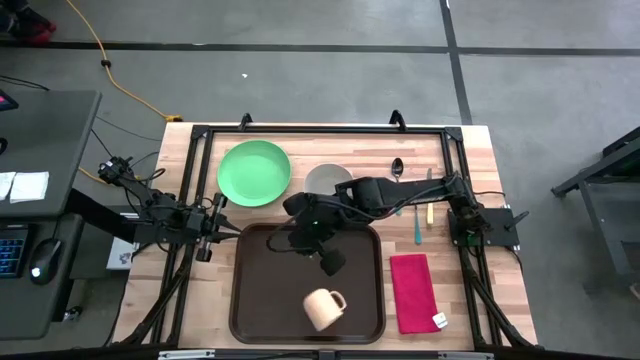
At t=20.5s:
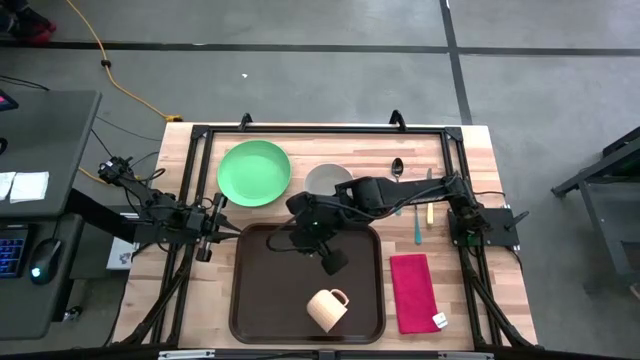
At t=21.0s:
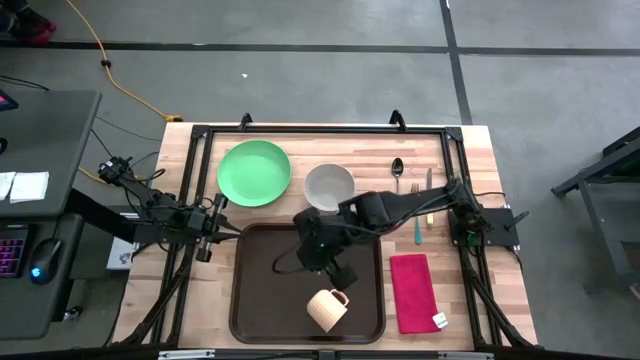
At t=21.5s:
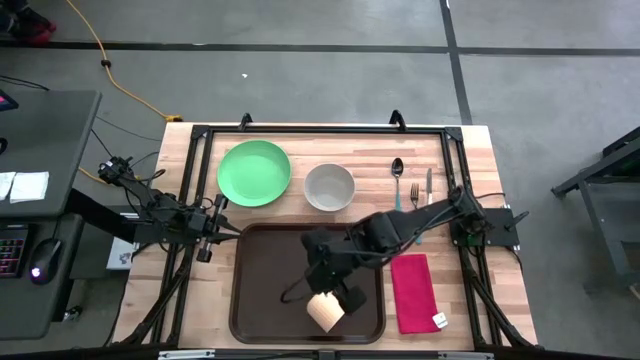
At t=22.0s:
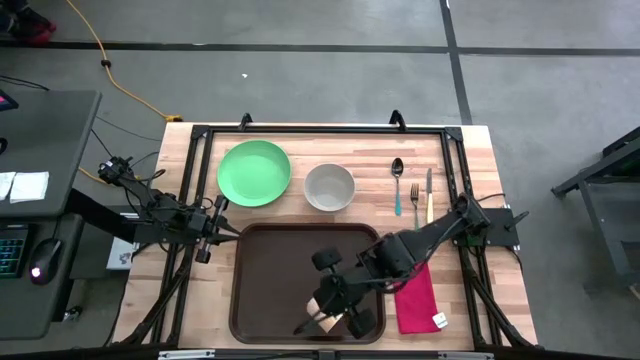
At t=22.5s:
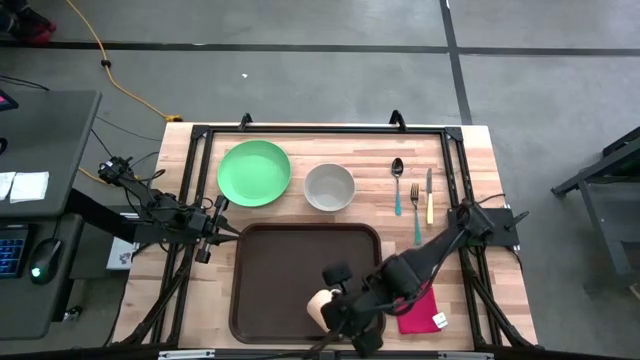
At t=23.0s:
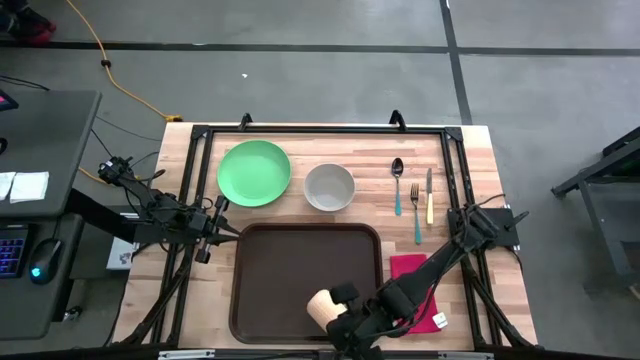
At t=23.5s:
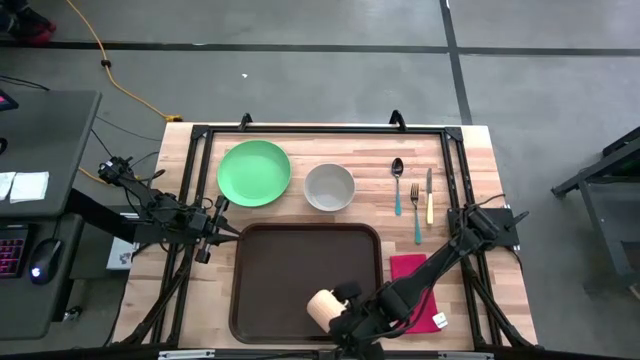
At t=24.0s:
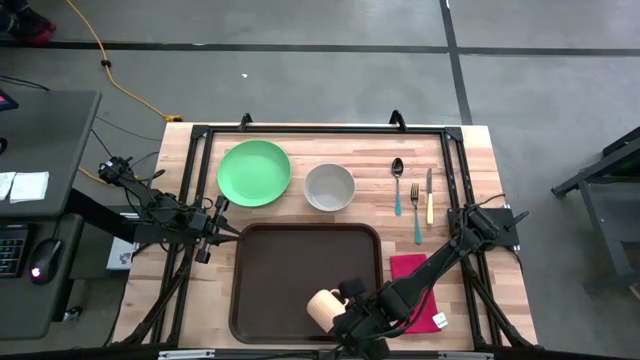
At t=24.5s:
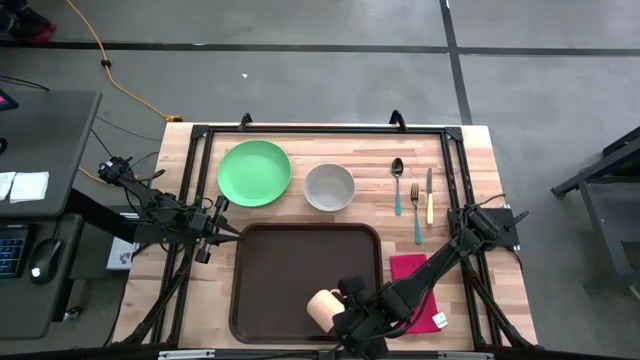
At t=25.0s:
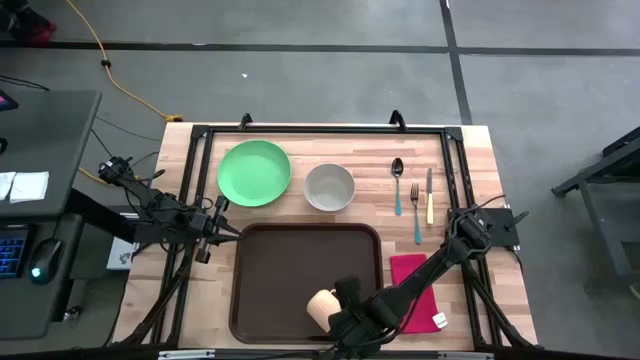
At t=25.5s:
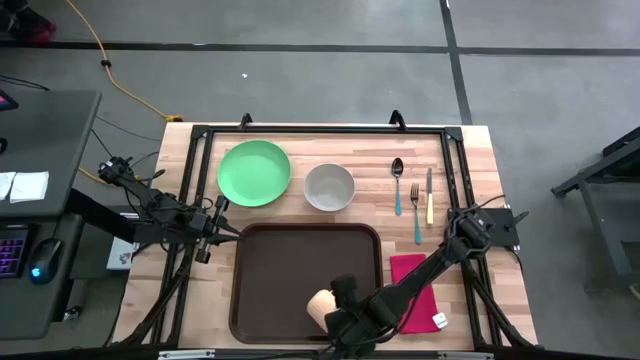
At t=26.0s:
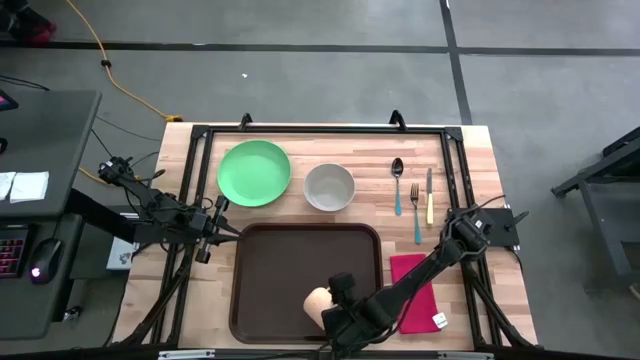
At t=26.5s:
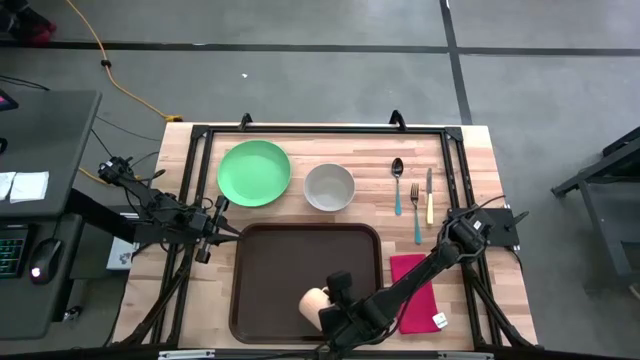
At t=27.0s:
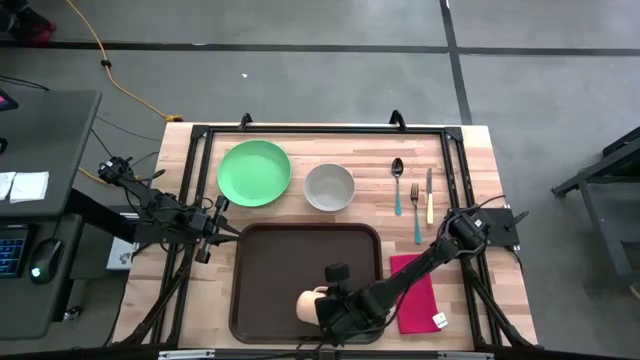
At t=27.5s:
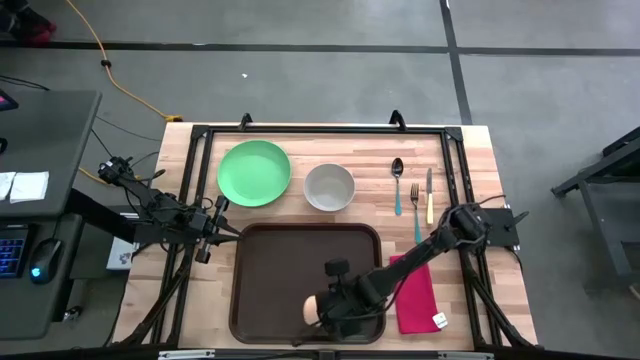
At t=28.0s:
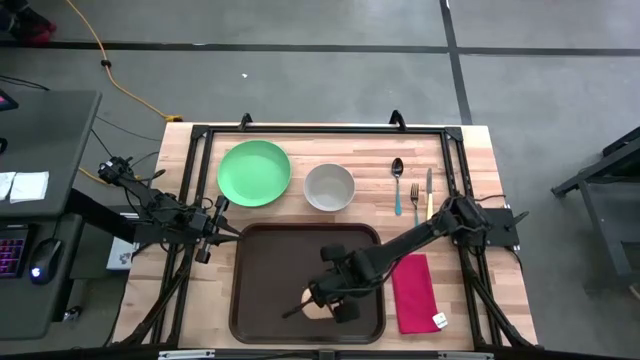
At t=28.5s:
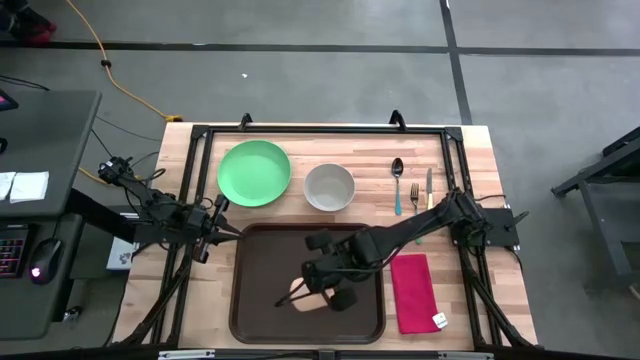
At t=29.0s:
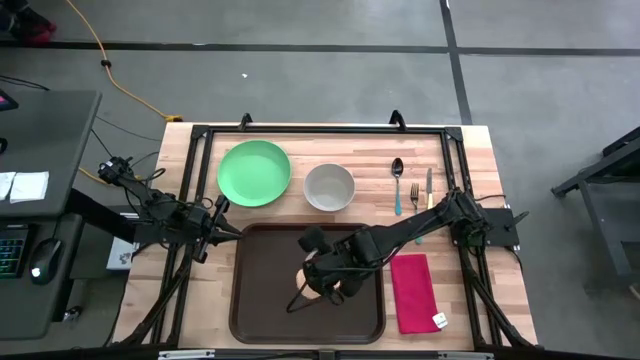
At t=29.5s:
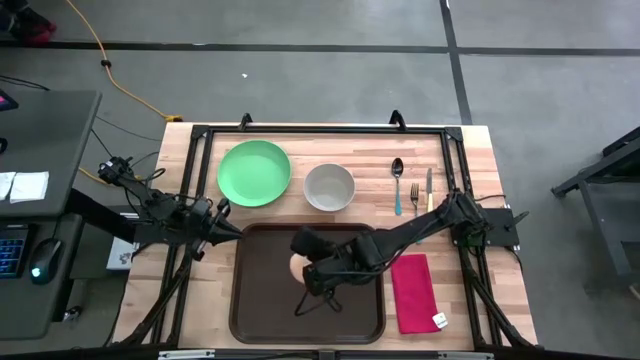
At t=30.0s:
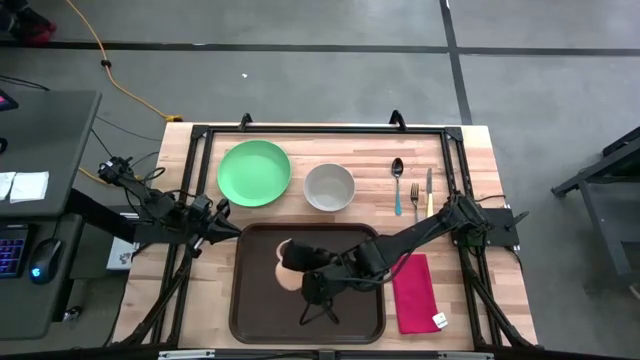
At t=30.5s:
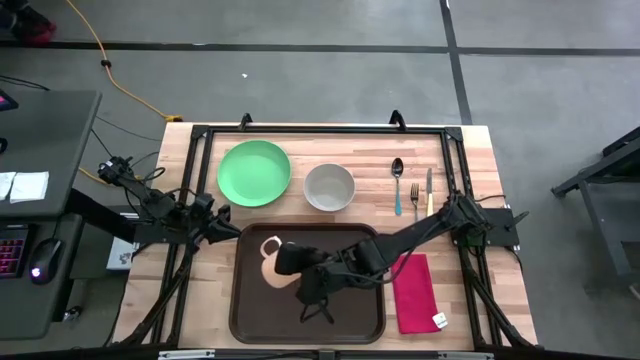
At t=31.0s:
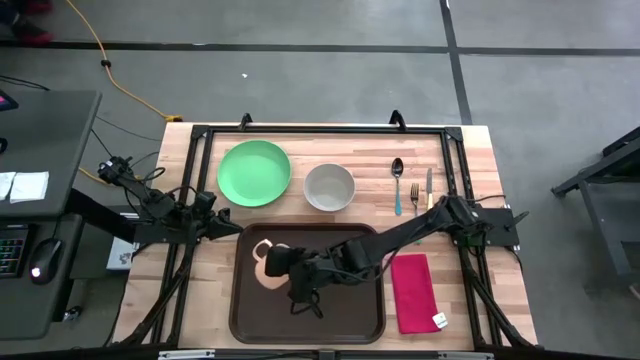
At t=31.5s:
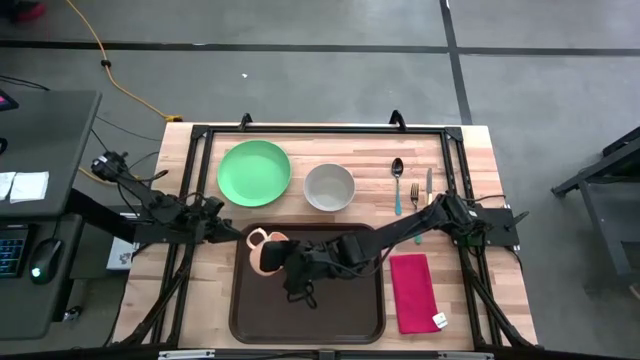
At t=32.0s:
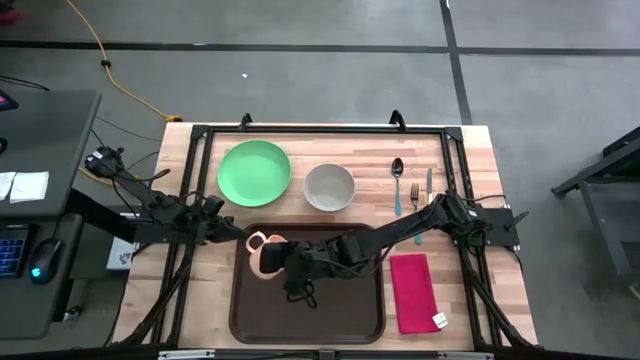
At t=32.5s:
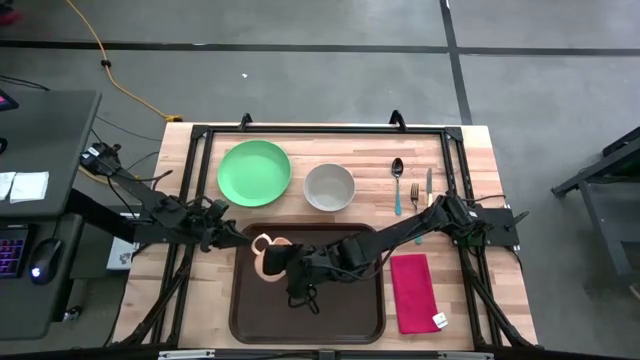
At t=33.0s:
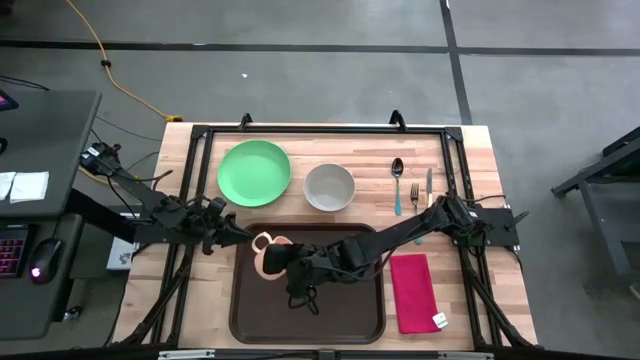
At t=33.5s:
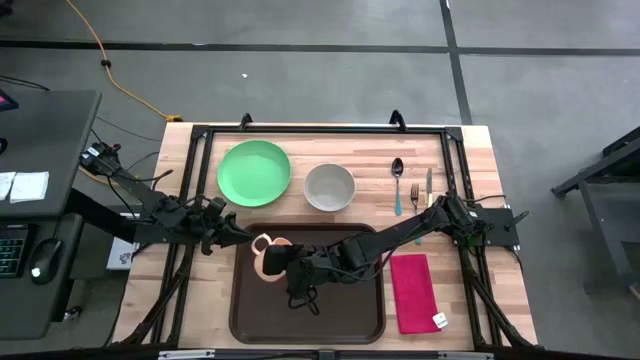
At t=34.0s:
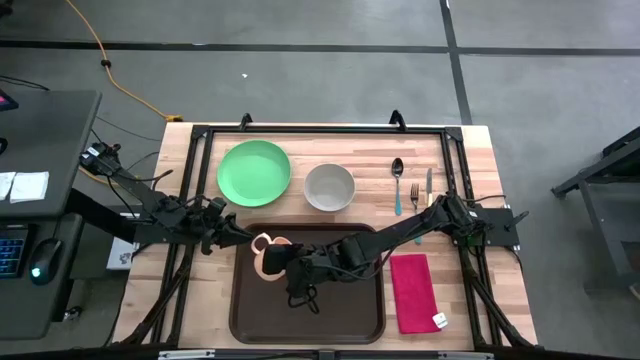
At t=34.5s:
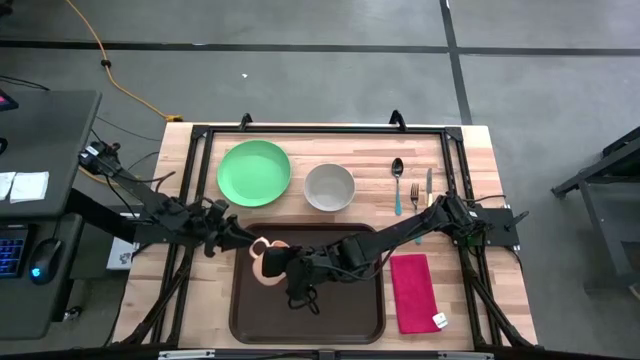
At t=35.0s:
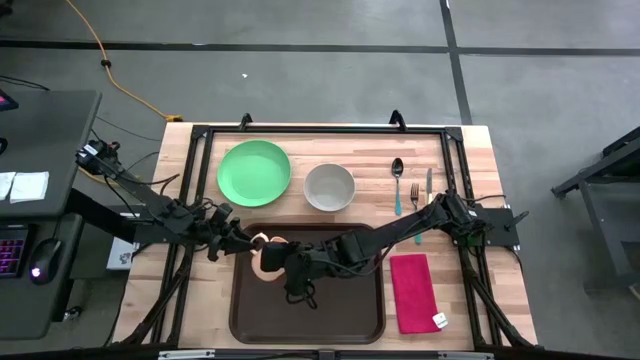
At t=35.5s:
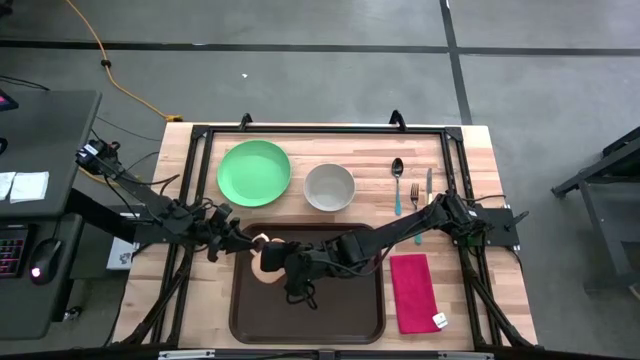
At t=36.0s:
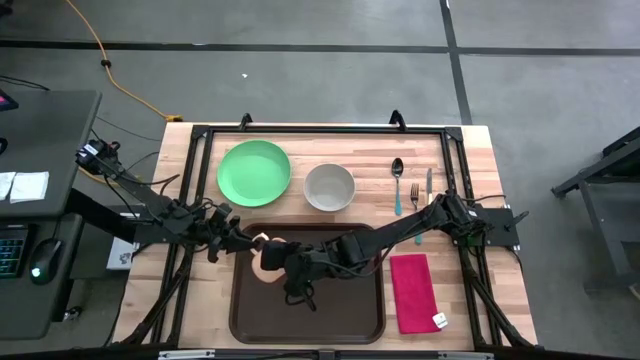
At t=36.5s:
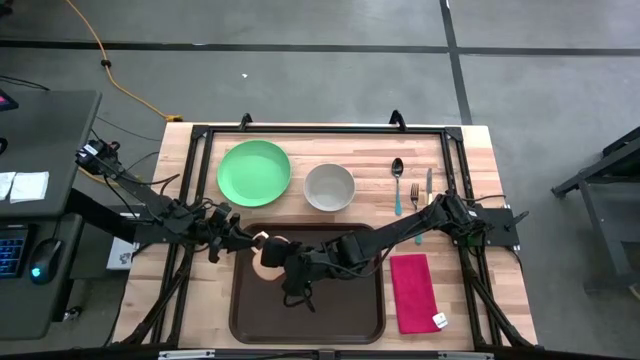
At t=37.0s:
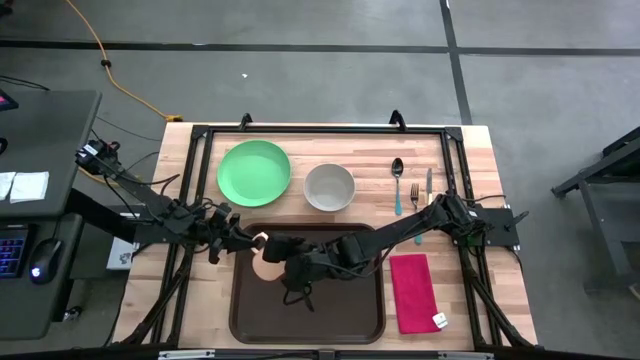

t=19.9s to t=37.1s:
Task: Set up tray
Put the light orange mug on the top left of the brown tray

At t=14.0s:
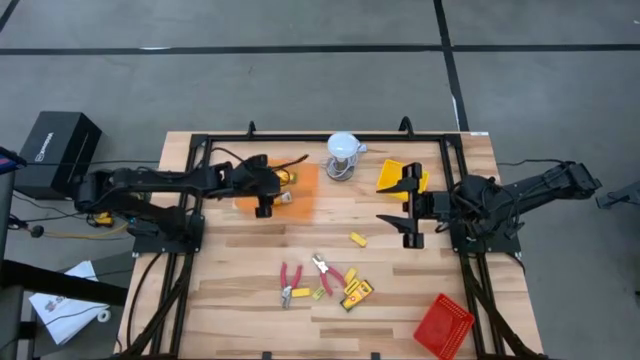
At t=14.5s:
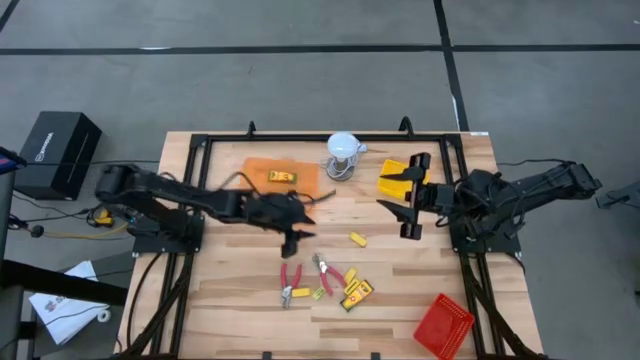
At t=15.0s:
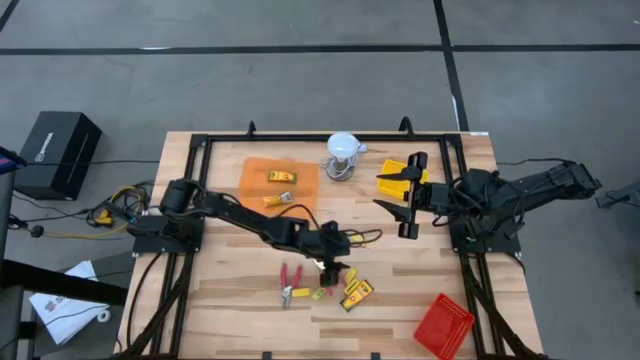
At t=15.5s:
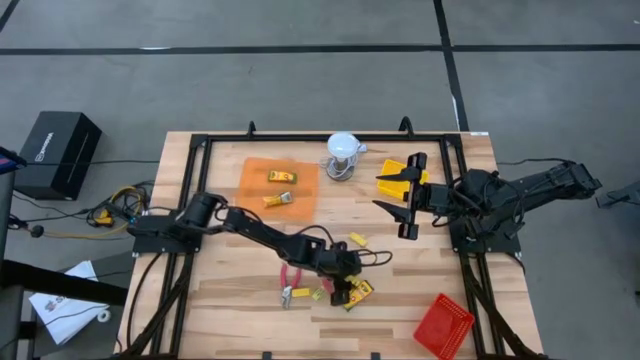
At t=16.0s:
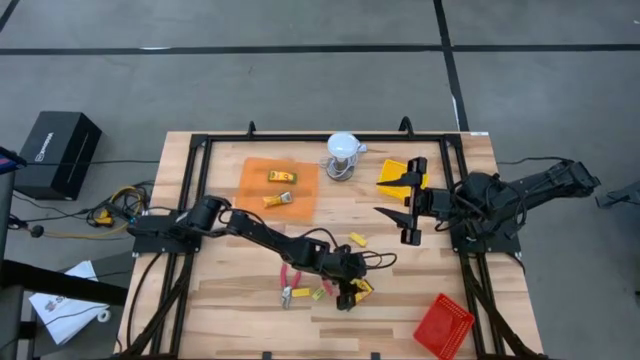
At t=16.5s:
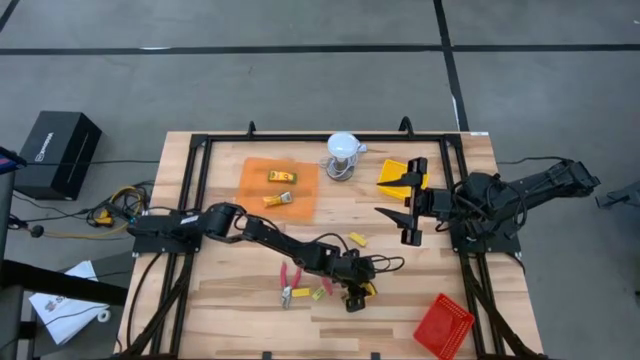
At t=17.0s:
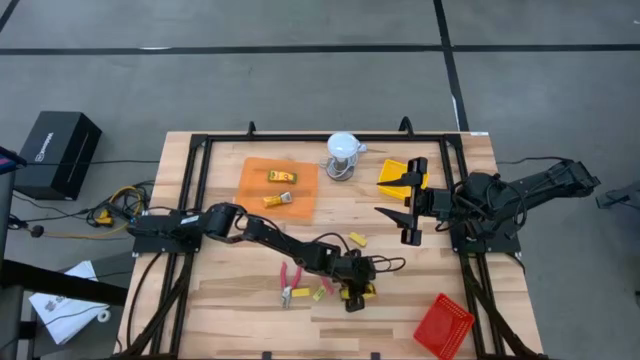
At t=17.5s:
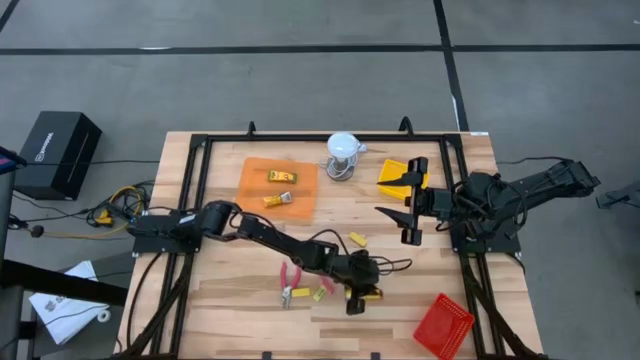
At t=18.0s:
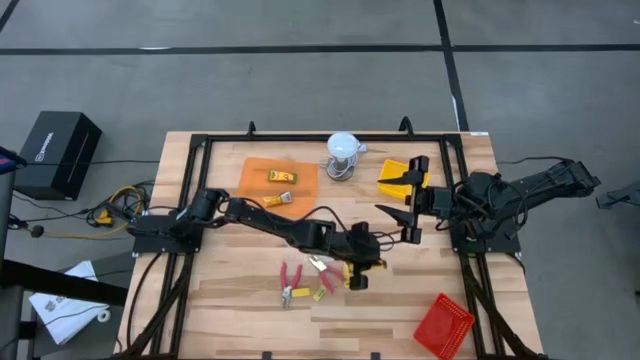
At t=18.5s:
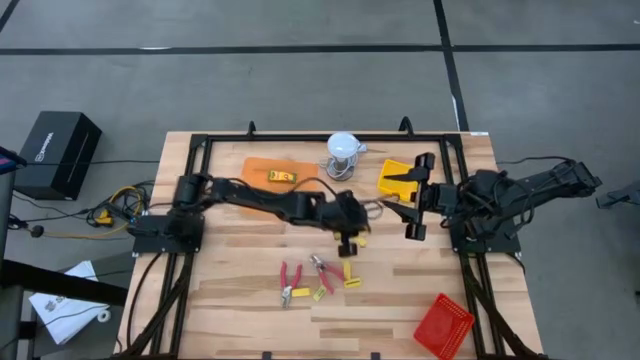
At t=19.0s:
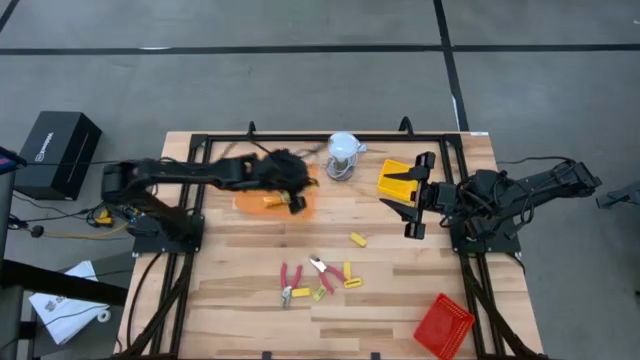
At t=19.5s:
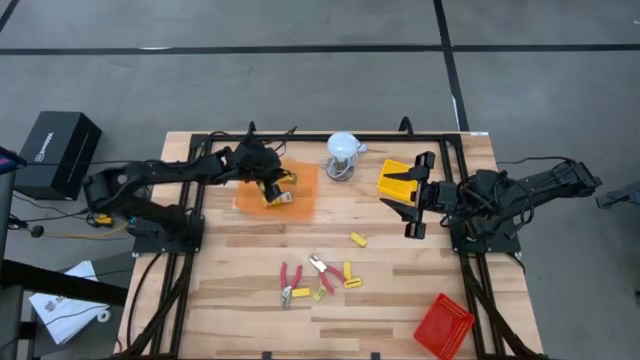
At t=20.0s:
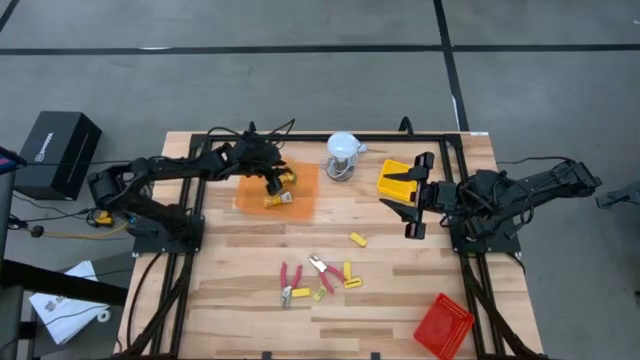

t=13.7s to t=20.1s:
Task: Pick & Place School Supplies
Put the yellow crayon pack into the orange bin
